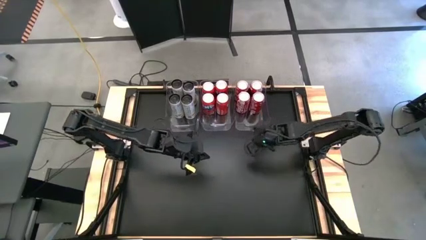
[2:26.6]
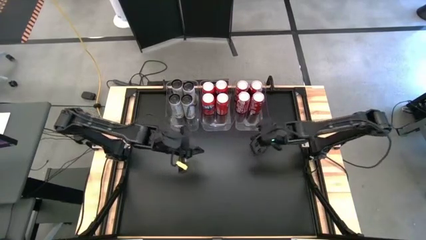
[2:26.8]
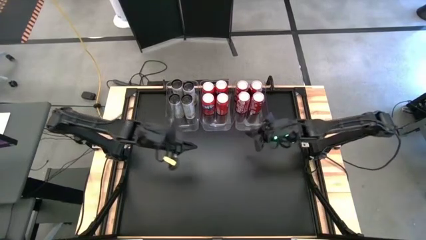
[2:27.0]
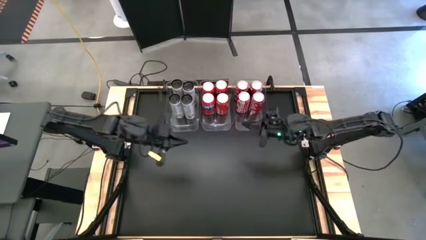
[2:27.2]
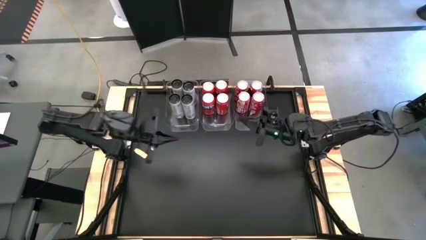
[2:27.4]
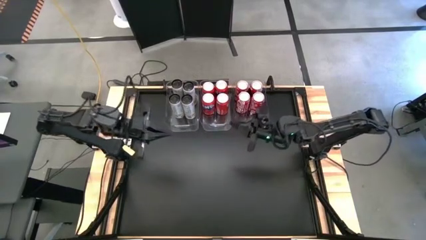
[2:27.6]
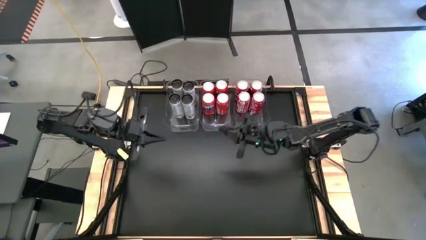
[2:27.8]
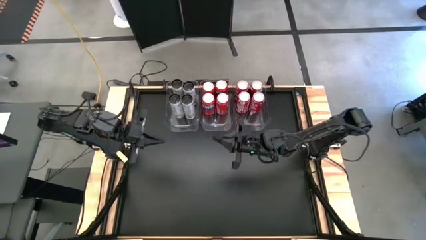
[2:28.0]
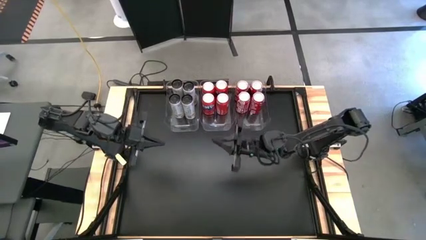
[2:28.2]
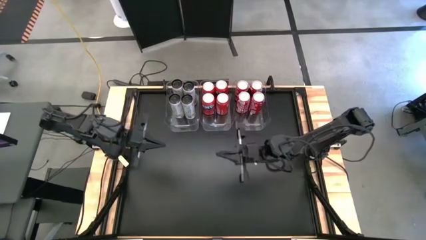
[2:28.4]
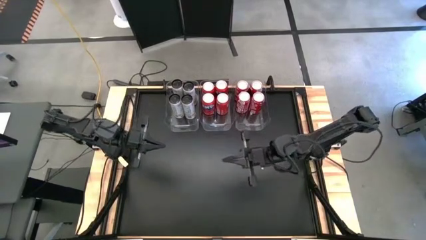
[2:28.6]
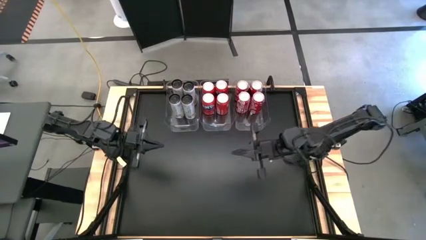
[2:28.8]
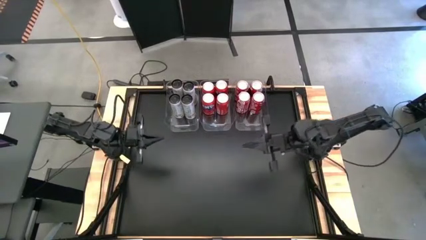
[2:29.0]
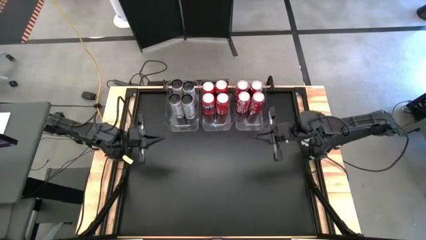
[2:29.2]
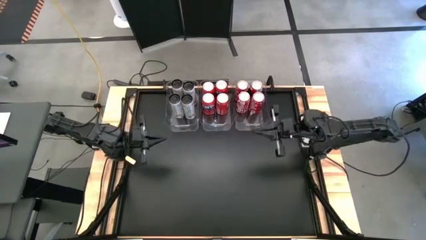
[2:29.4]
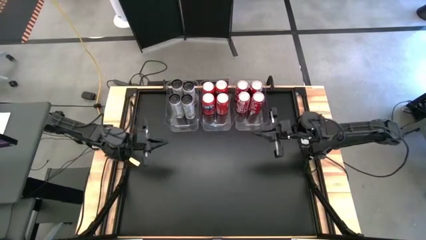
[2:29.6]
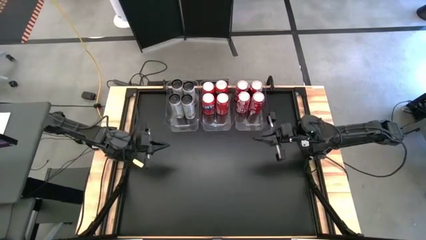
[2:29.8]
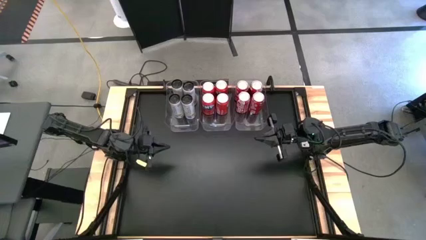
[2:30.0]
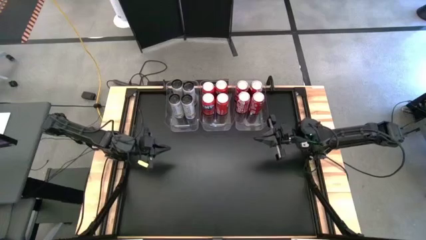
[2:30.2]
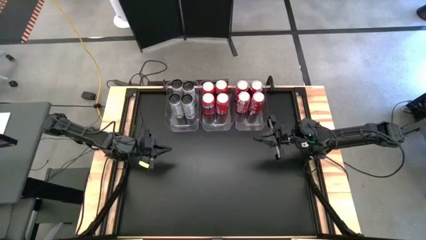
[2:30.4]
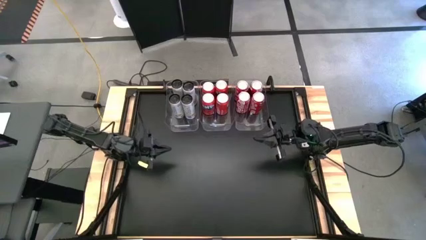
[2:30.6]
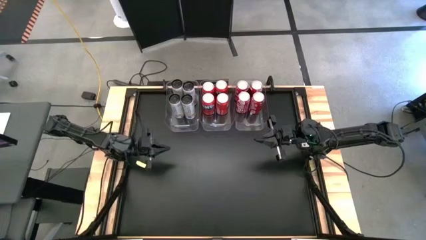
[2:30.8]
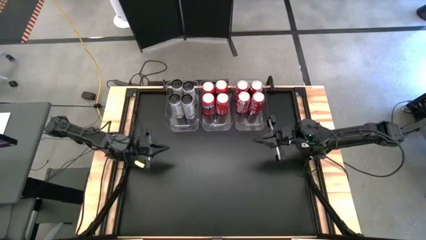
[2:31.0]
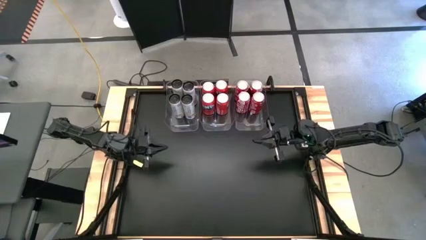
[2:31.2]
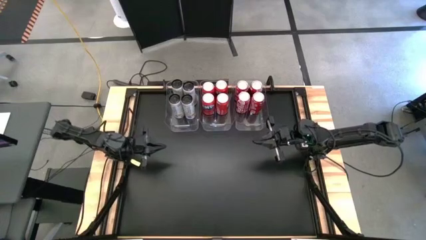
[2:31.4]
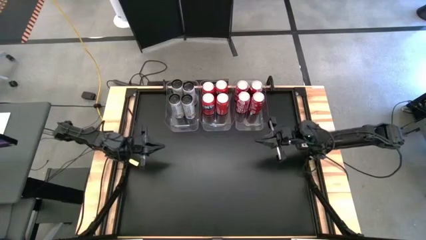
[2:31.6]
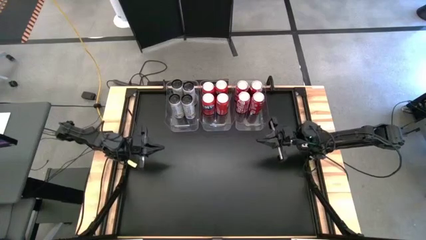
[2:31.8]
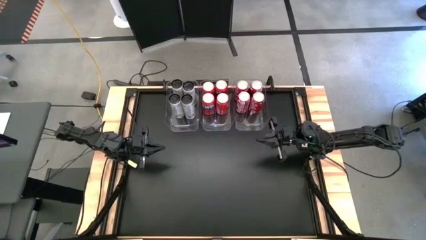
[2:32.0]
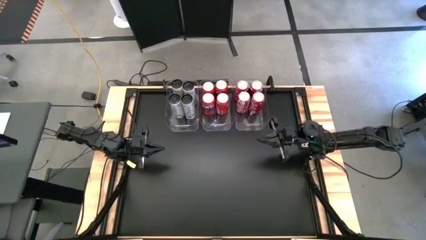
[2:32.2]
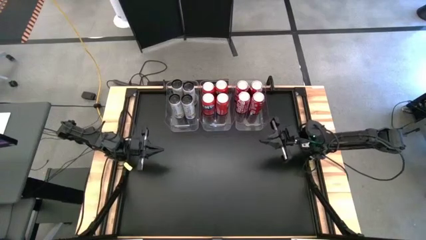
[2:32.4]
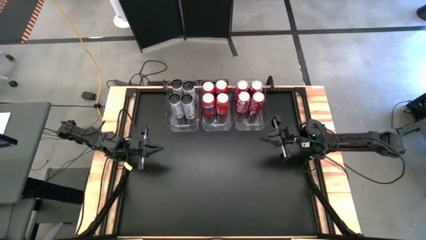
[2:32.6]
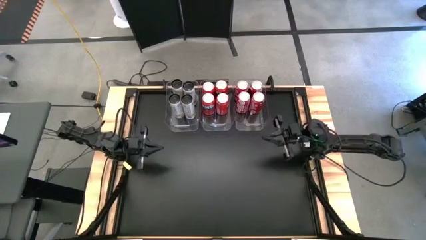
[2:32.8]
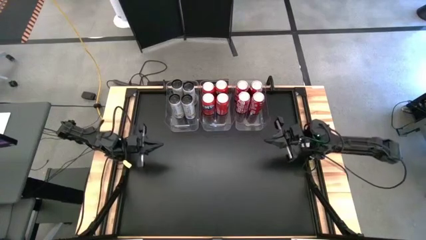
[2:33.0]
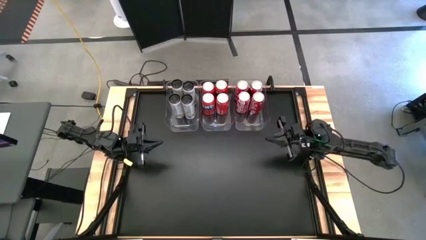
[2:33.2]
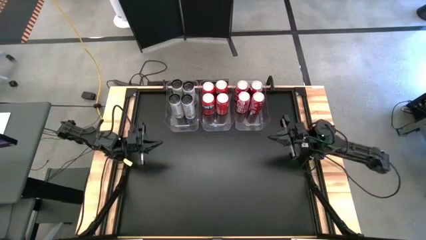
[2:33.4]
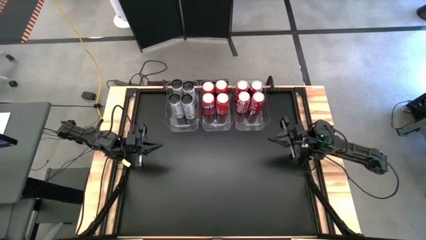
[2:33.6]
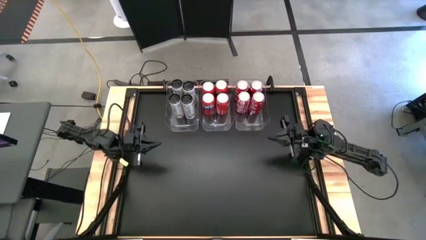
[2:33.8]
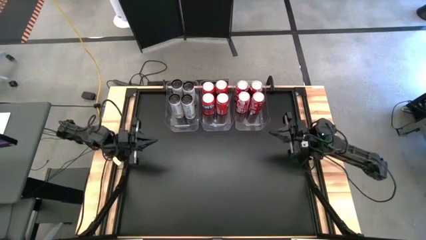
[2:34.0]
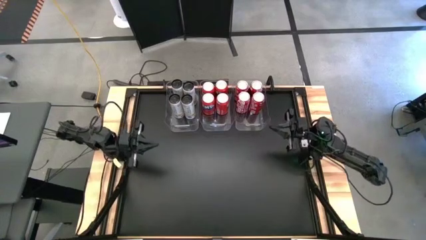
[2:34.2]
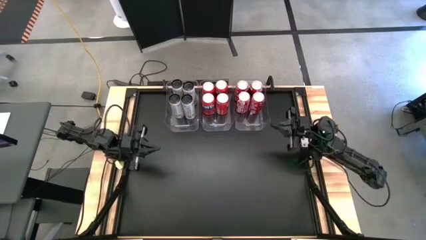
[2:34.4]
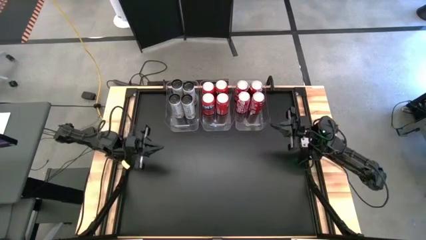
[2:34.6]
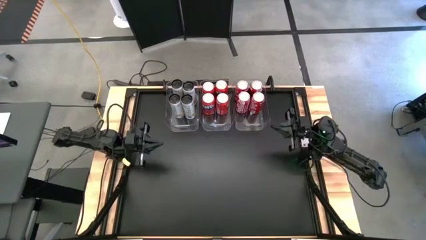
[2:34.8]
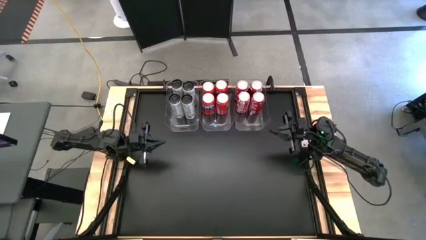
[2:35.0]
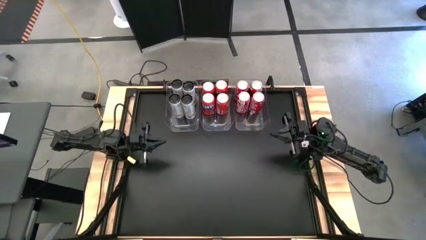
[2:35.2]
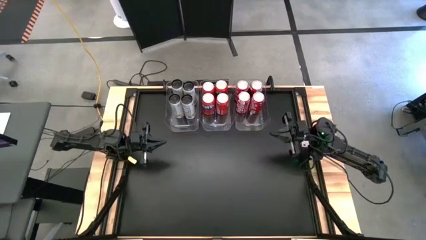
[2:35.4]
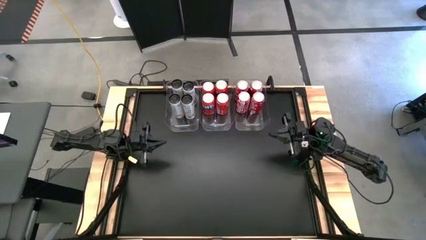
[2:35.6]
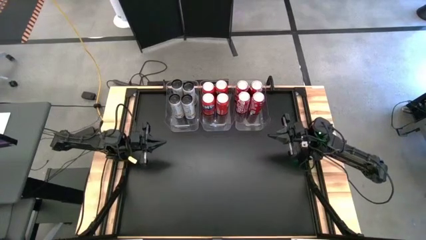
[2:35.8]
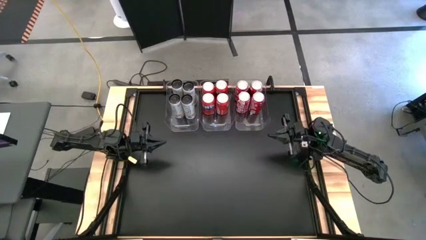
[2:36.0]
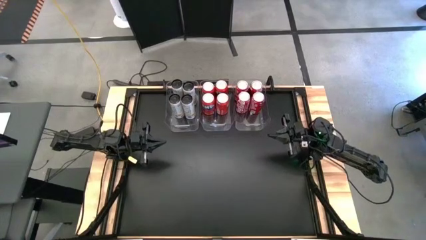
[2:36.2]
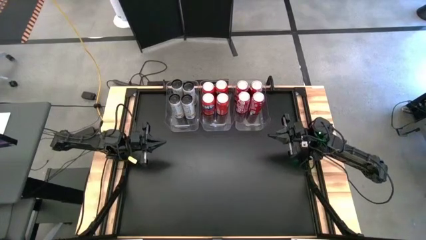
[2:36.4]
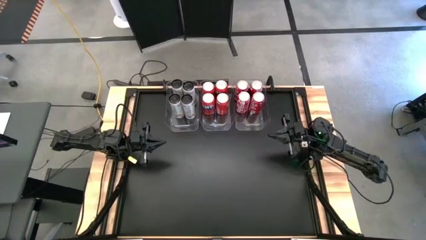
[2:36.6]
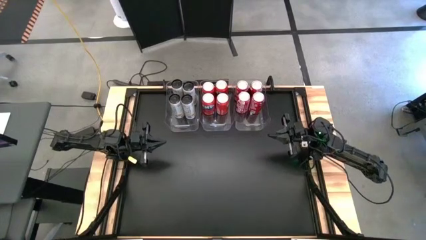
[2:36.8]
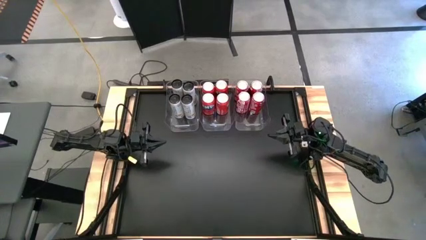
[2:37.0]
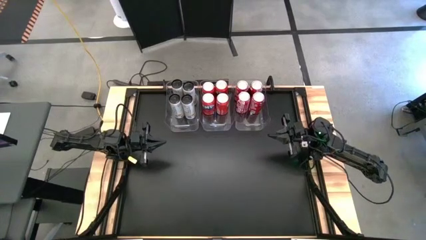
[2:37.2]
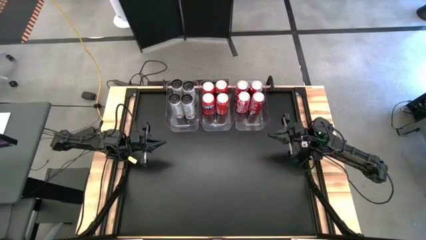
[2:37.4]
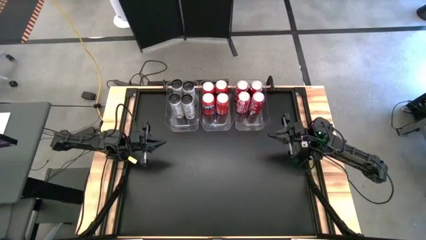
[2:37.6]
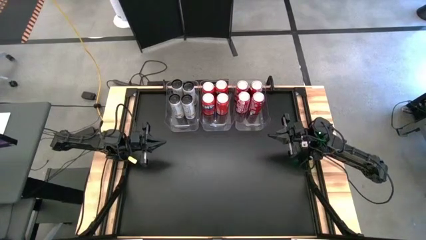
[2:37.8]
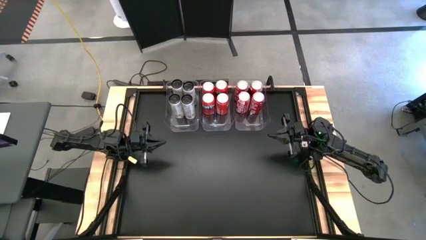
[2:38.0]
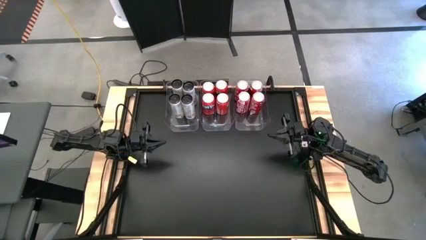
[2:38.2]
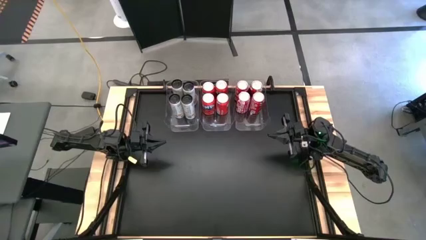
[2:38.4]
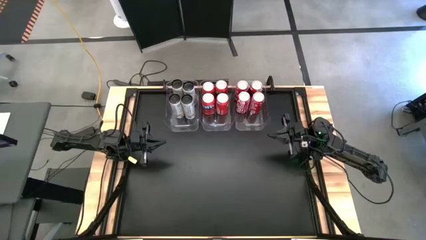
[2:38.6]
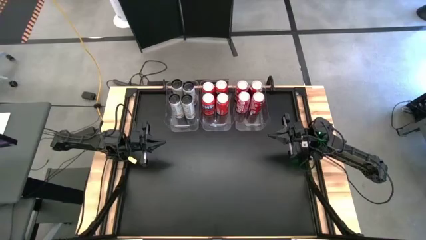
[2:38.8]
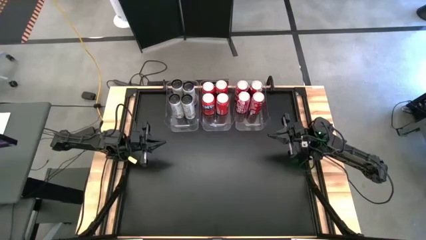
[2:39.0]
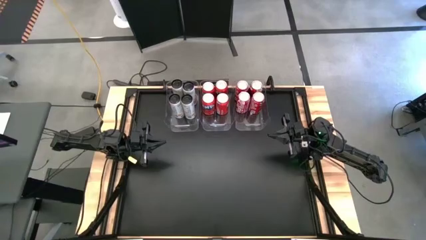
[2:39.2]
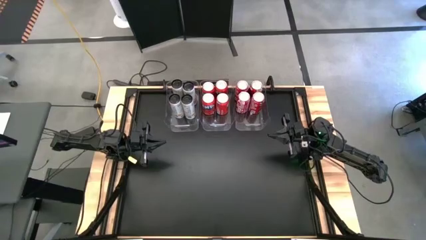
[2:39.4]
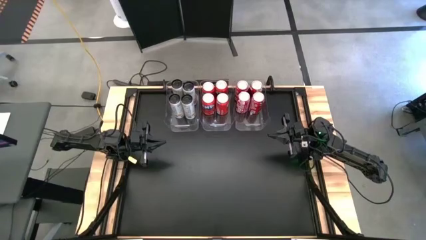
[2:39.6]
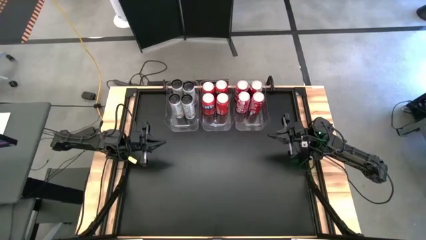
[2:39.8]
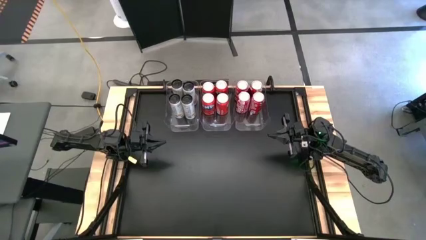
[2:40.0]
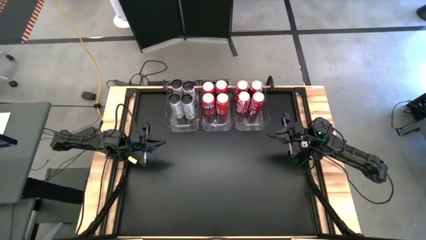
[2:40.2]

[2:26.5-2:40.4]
Task: Sort soda cans
Return to Home Position
